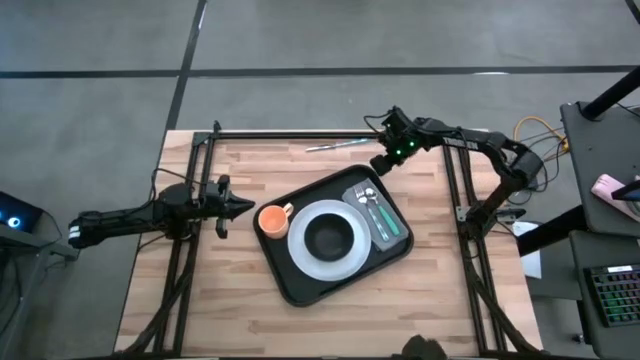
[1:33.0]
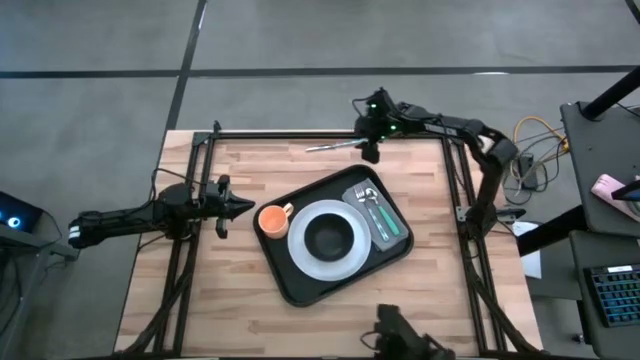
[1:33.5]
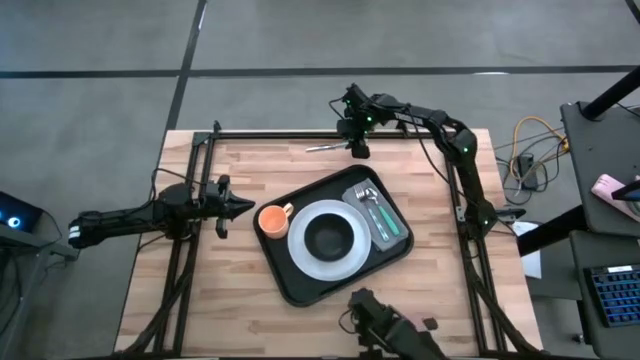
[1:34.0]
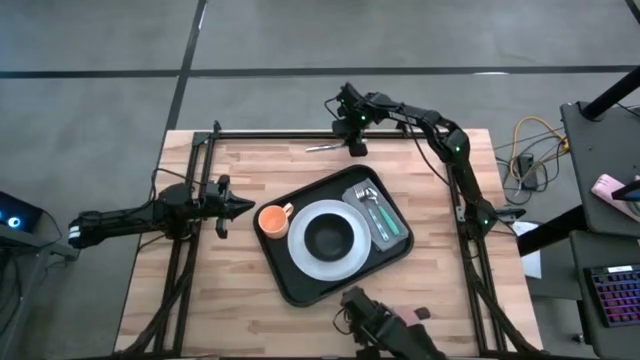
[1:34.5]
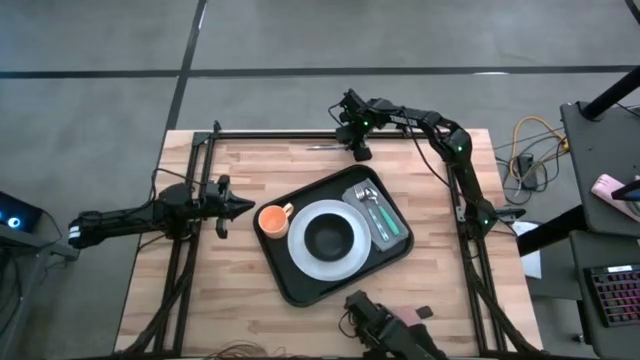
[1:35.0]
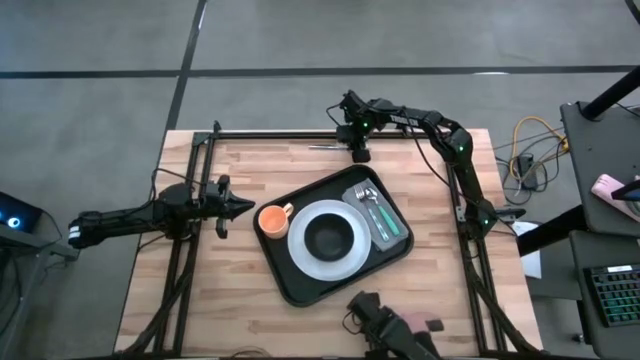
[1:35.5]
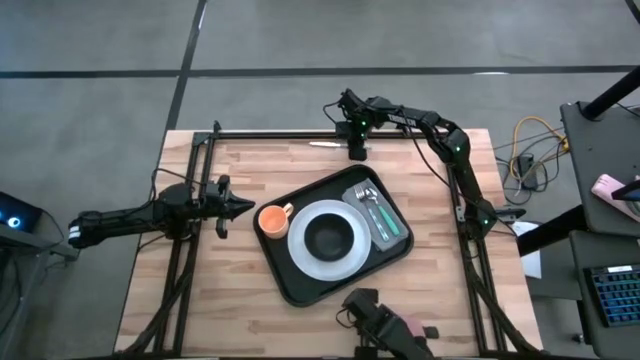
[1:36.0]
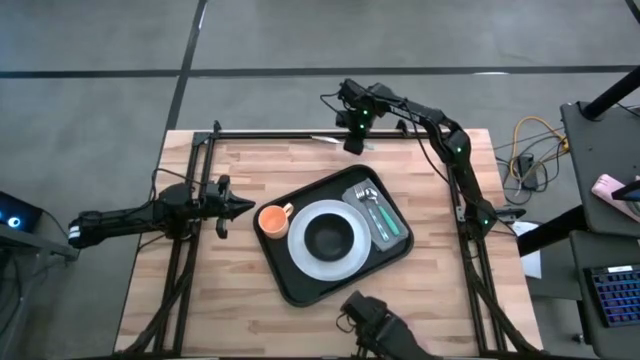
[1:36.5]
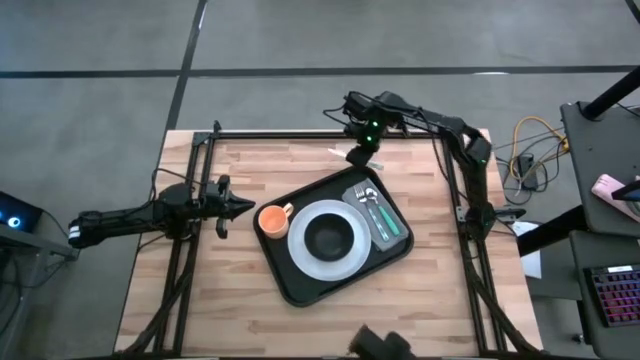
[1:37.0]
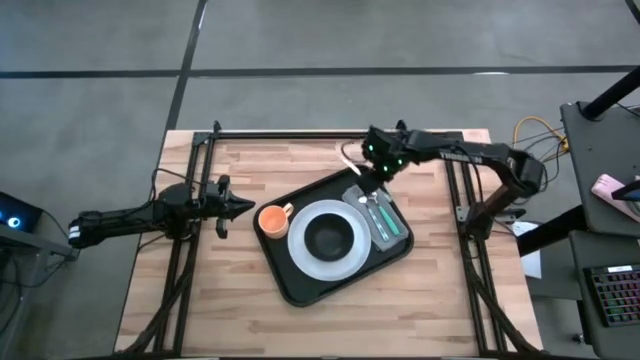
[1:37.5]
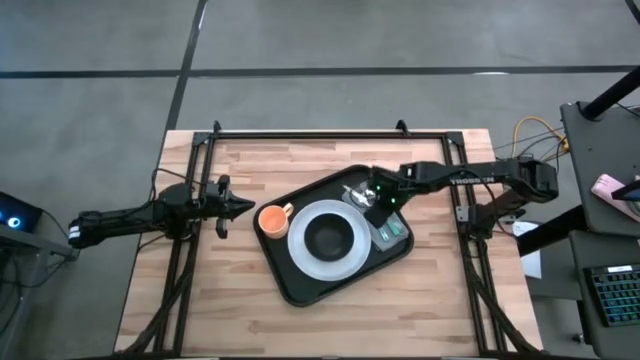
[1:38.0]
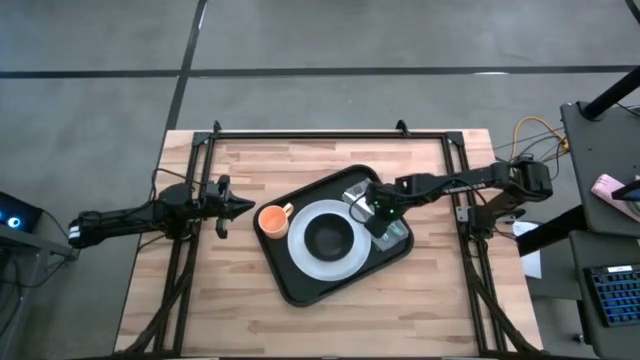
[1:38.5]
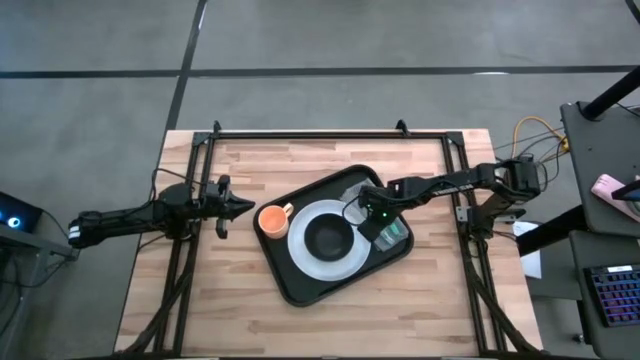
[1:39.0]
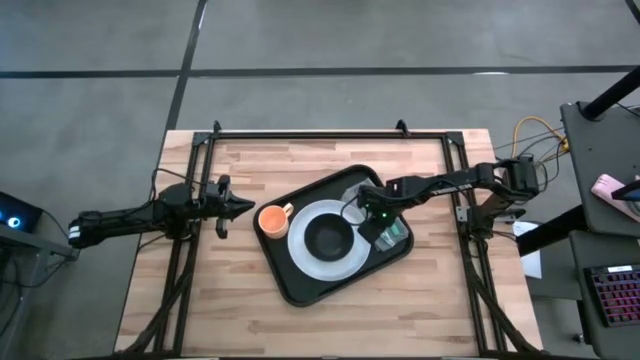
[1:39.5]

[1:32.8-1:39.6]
Task: Set up tray
Put the light blue knife on the gray napkin to the left of the light blue fork on the black tray

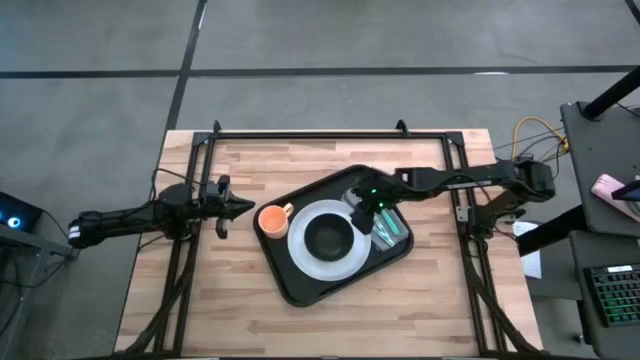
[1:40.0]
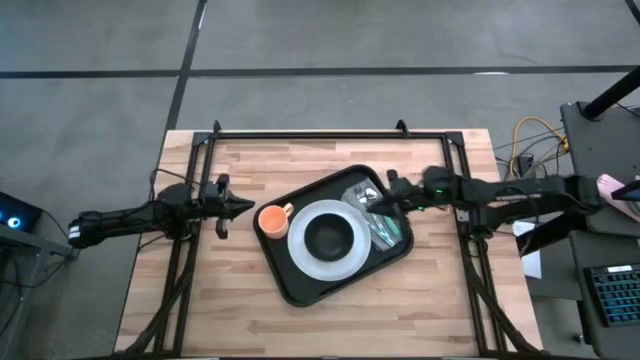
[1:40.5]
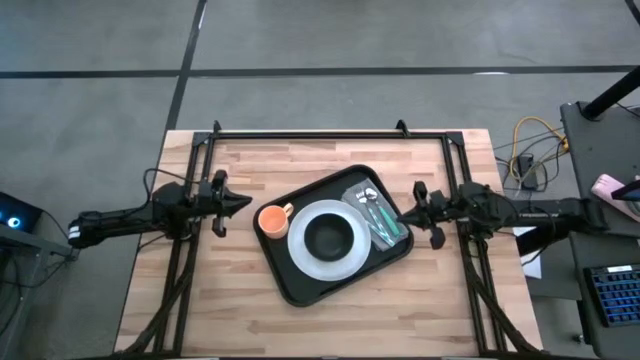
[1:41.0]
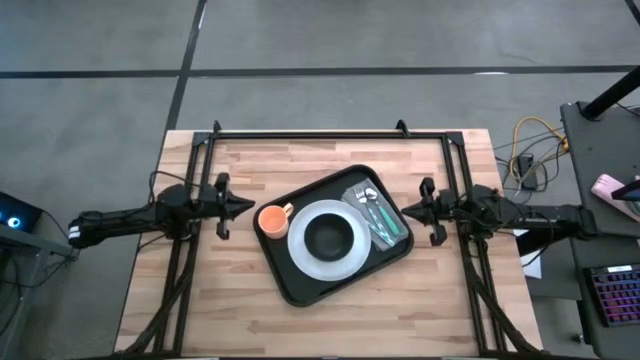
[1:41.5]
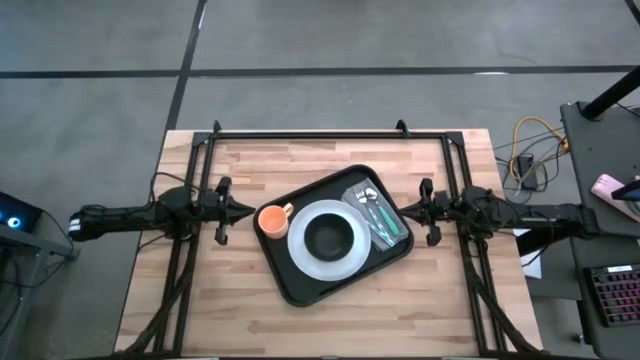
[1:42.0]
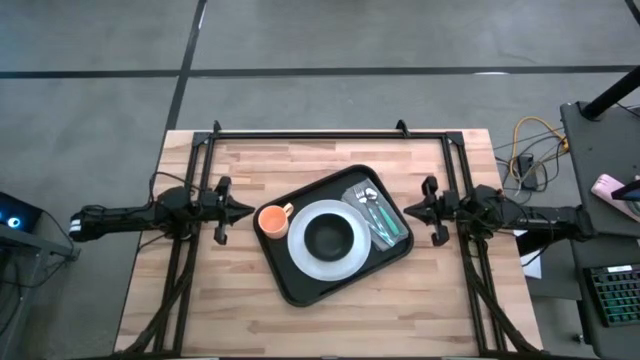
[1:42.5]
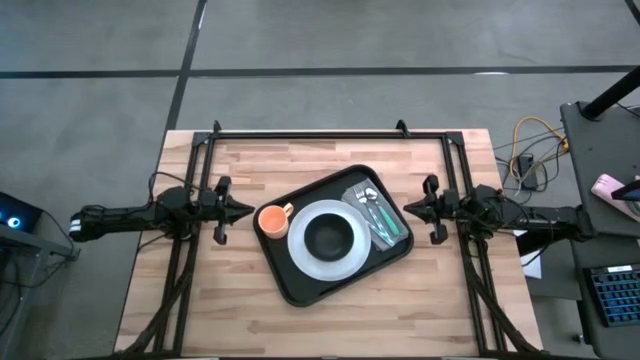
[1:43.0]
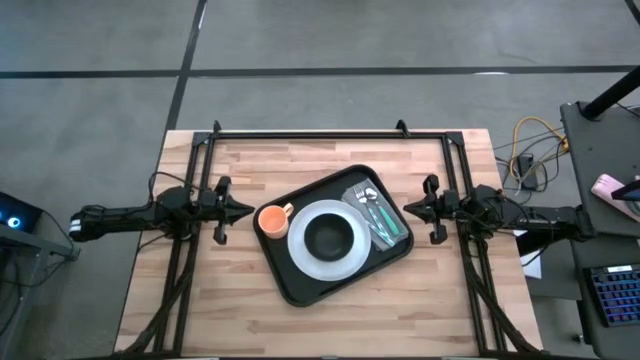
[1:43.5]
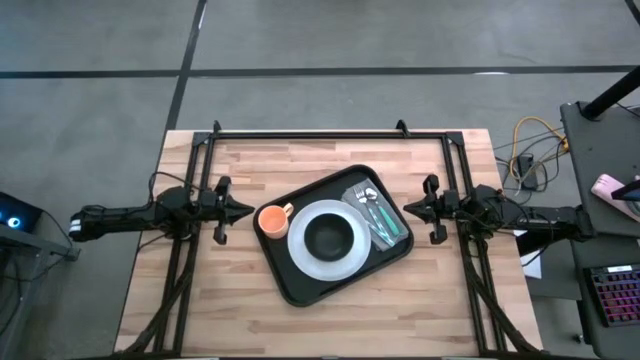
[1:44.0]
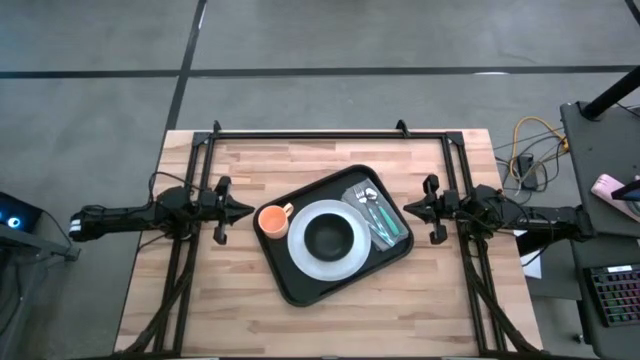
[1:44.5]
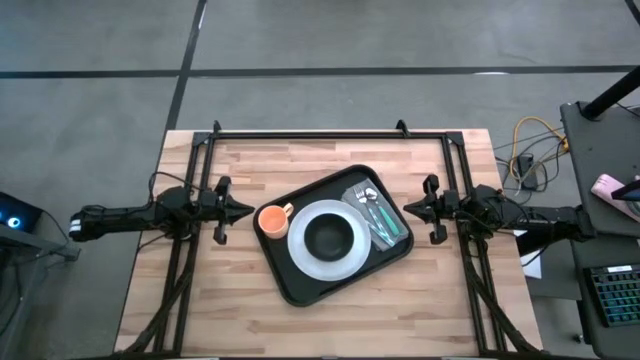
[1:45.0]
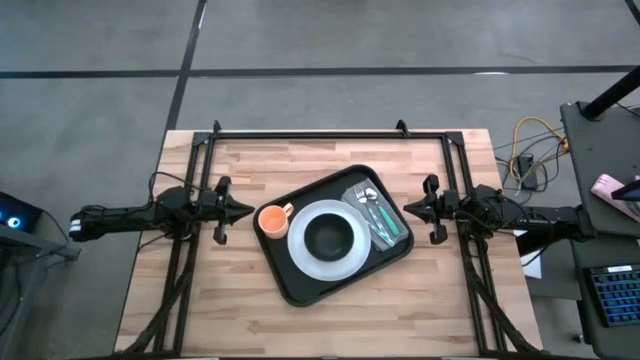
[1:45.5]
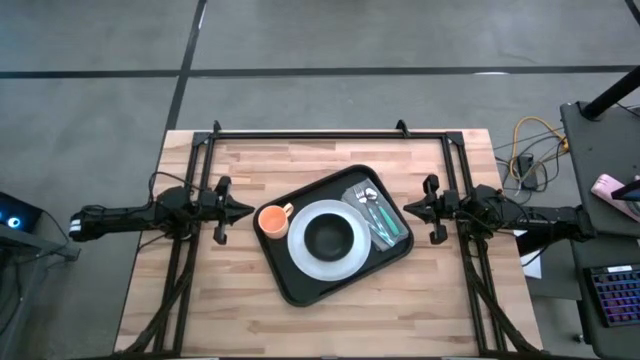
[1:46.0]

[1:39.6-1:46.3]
Return to Home Position

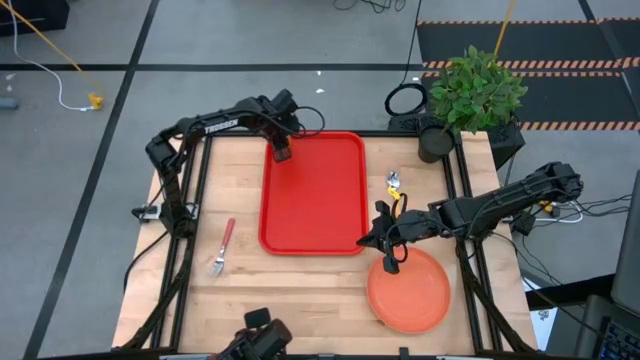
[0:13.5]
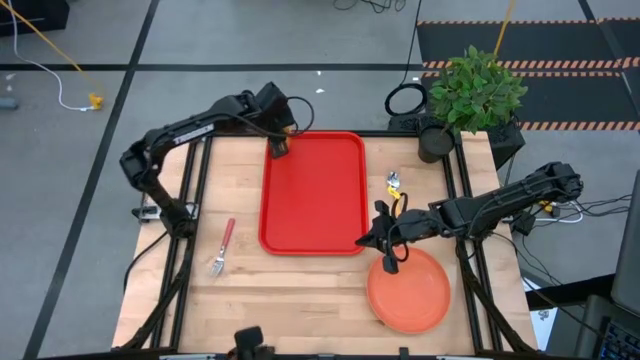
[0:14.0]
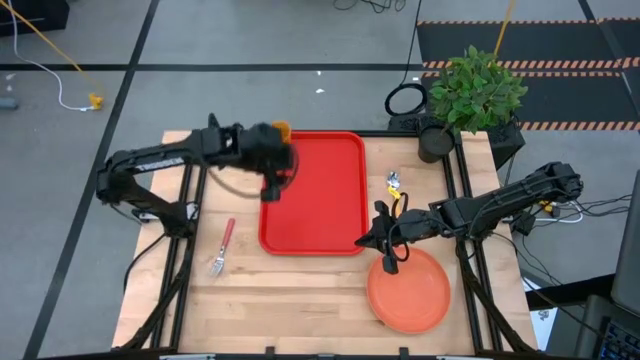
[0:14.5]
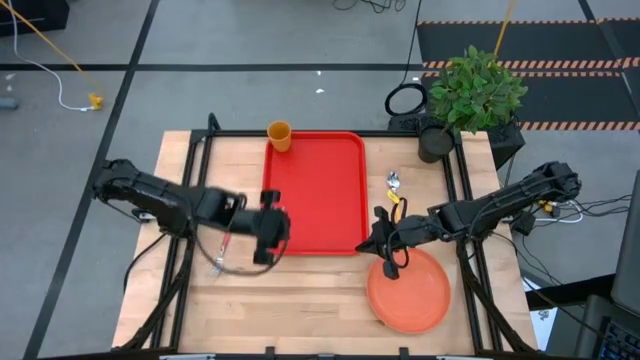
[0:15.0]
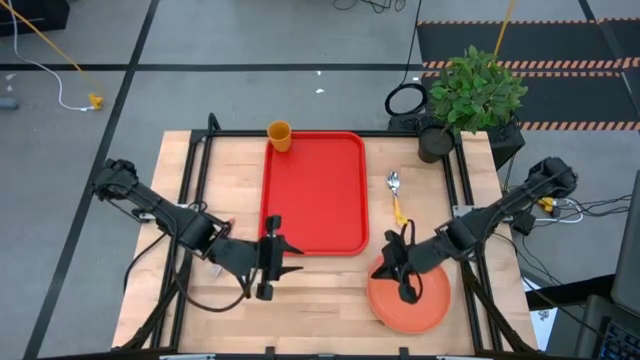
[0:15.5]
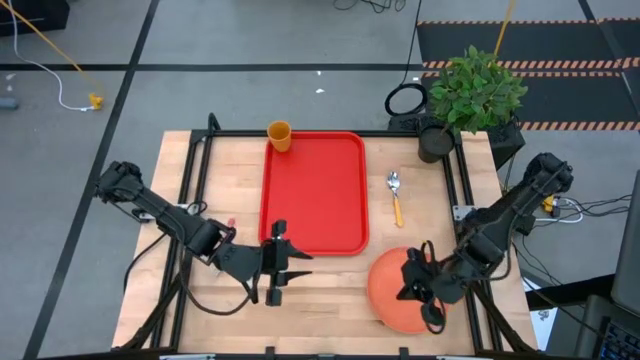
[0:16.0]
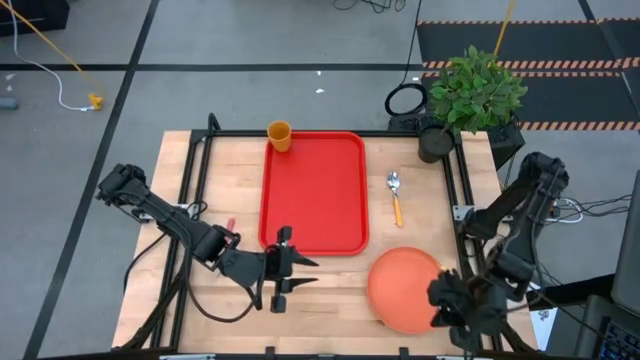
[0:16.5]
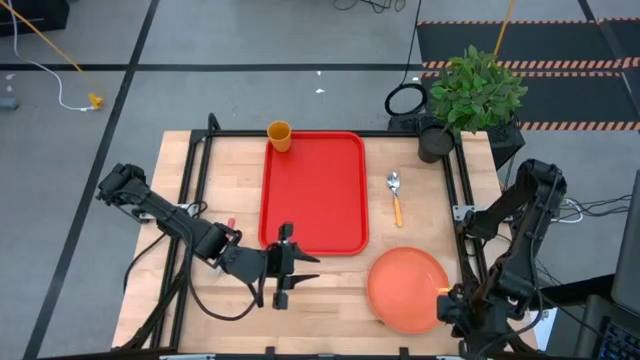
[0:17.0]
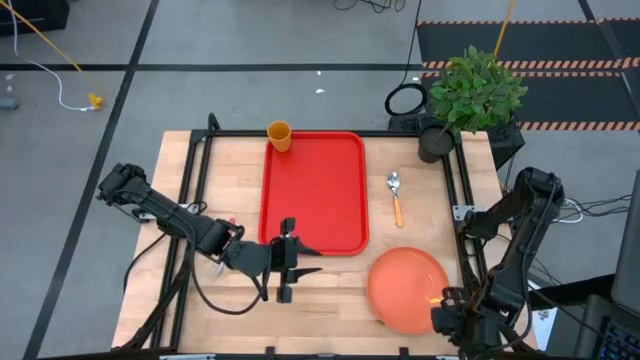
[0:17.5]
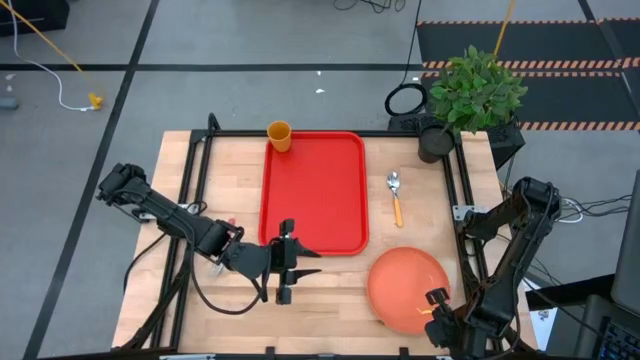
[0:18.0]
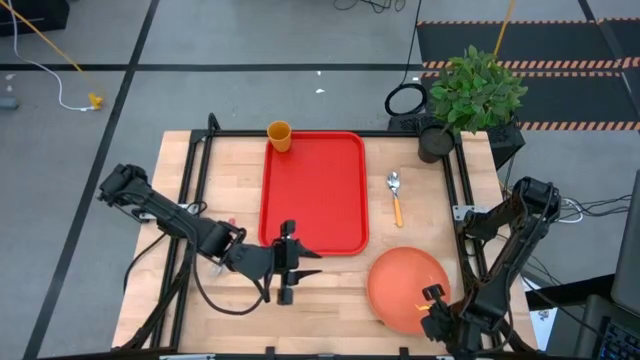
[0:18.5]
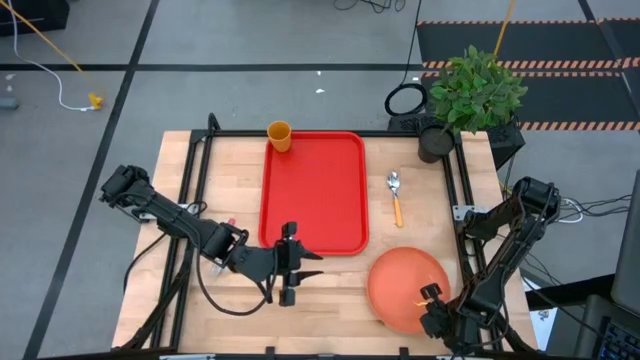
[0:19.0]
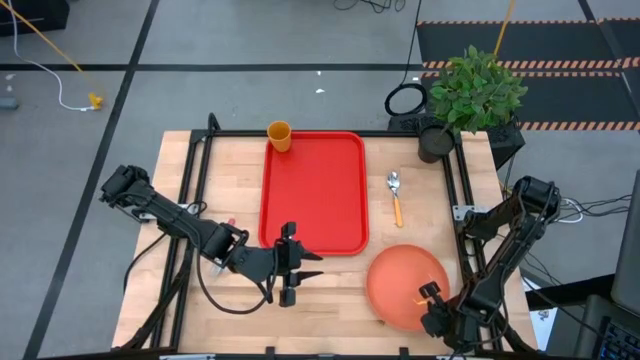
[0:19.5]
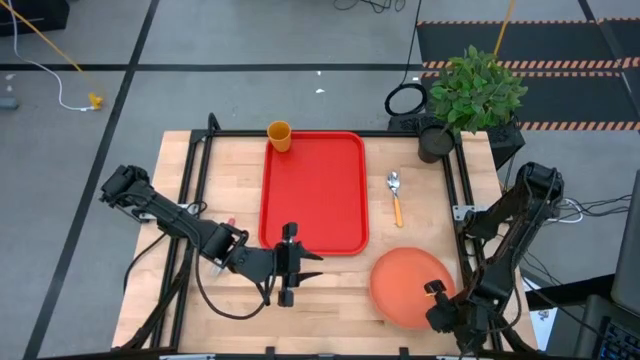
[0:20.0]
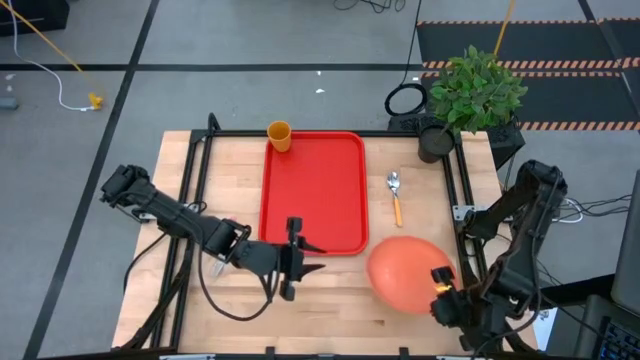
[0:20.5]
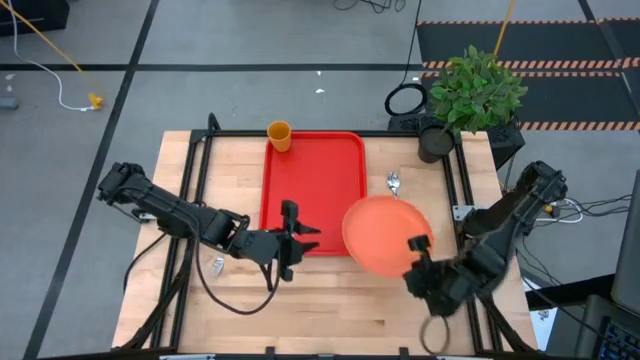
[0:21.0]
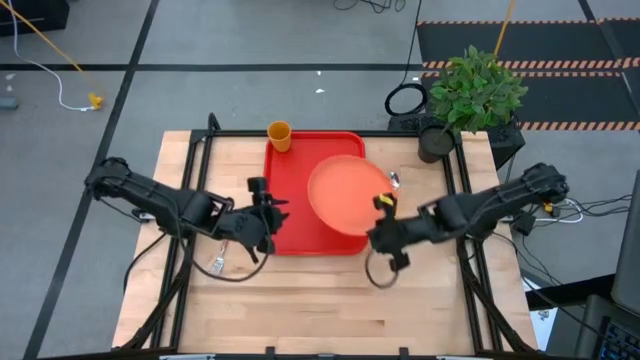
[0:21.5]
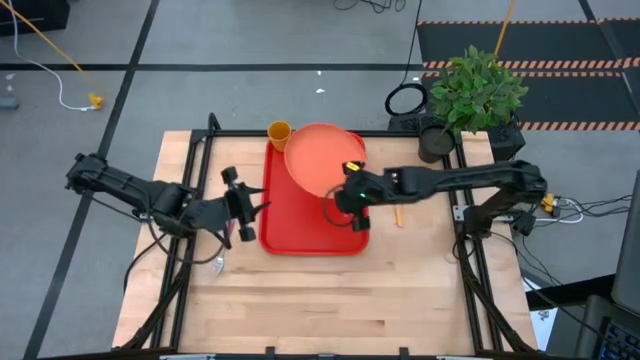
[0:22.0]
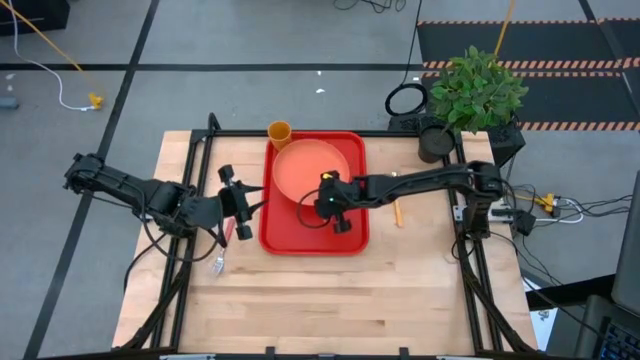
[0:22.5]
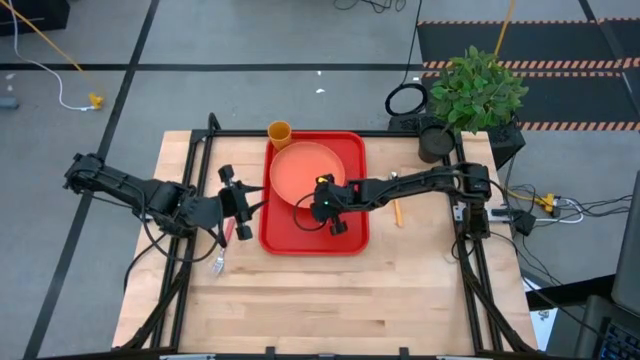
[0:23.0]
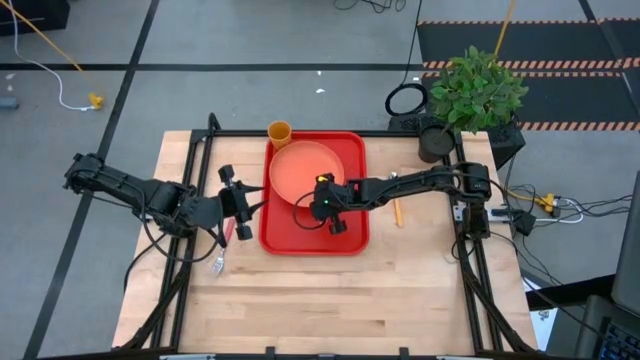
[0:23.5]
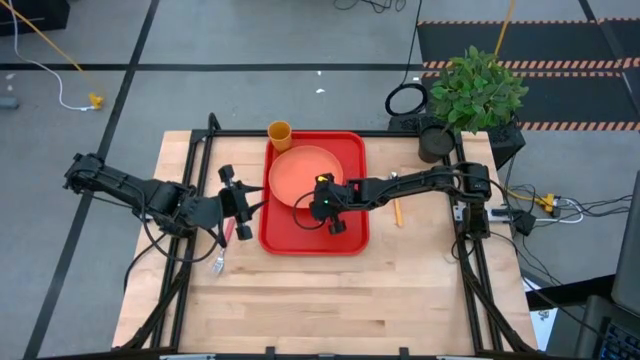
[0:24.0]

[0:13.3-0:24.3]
Task: Pick and place plate/cup/fork/spoon on tray
Put the orange plate on the red serving tray to the left side of the yellow cup
